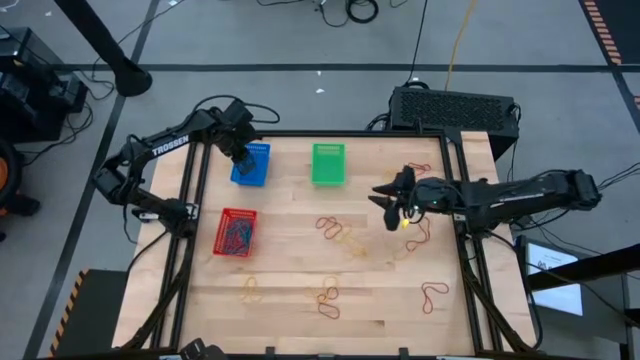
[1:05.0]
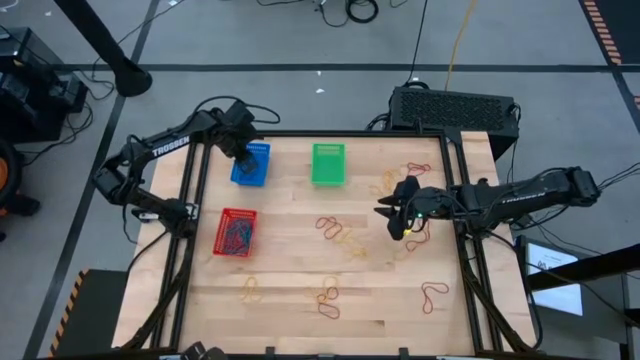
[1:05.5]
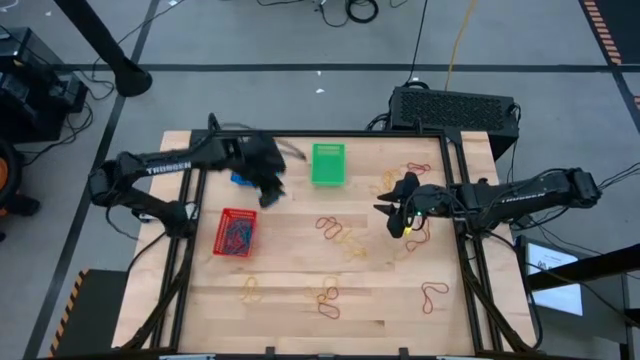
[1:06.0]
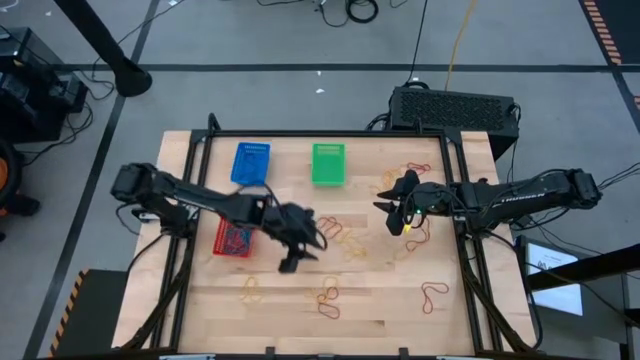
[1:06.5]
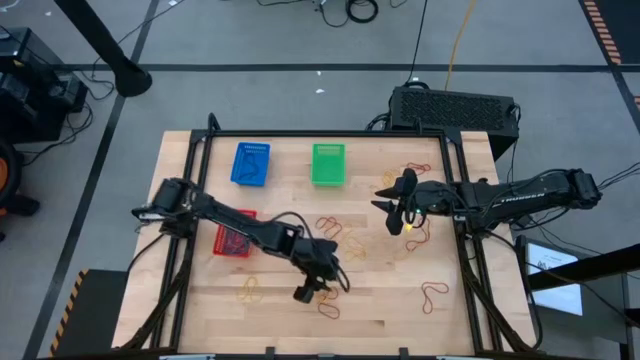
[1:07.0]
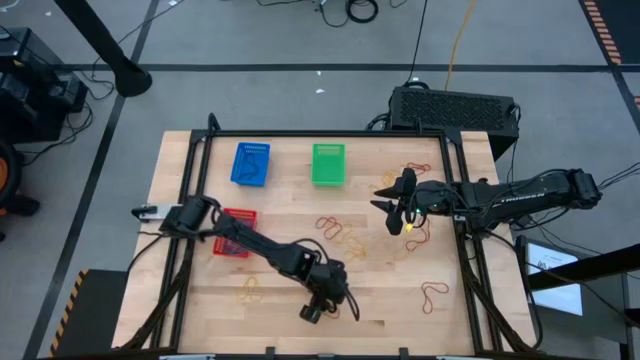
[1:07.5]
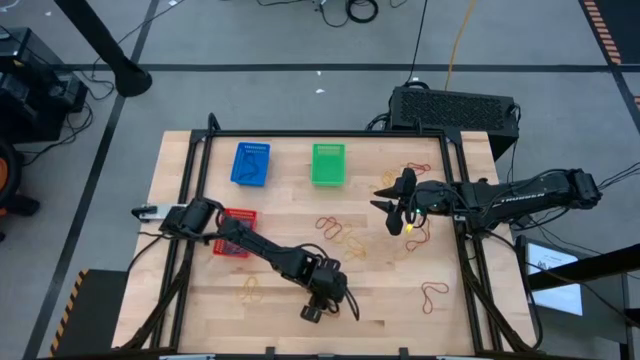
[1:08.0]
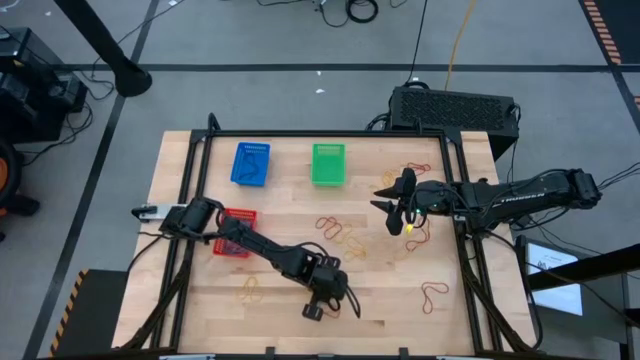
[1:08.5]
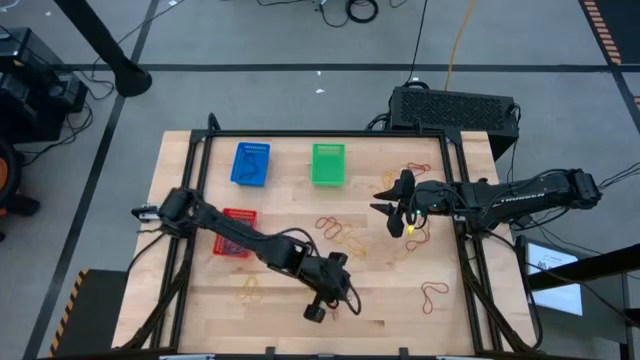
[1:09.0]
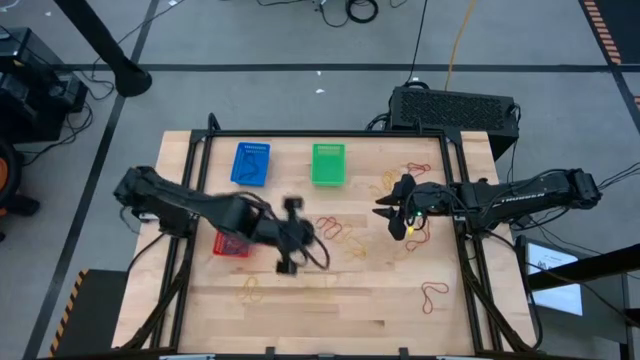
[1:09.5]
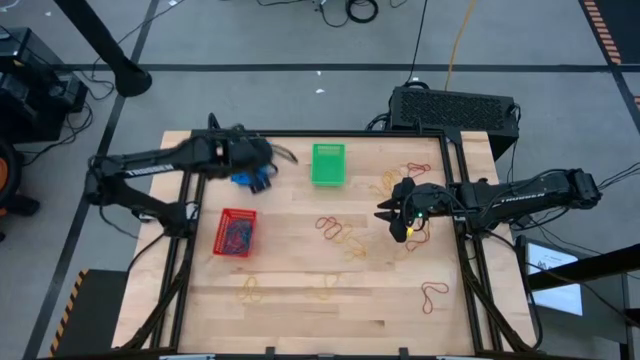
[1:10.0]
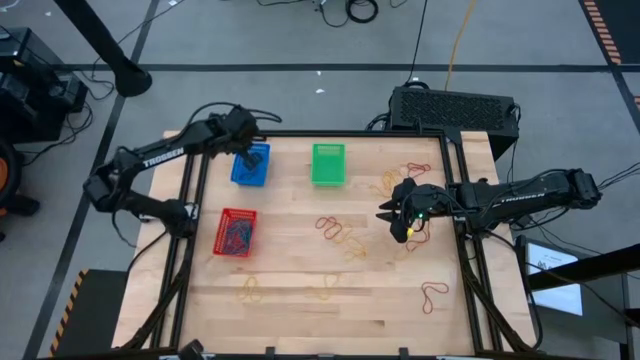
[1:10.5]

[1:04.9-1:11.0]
Task: Sort rubber bands into baskets
Put the red rubber band into the blue basket

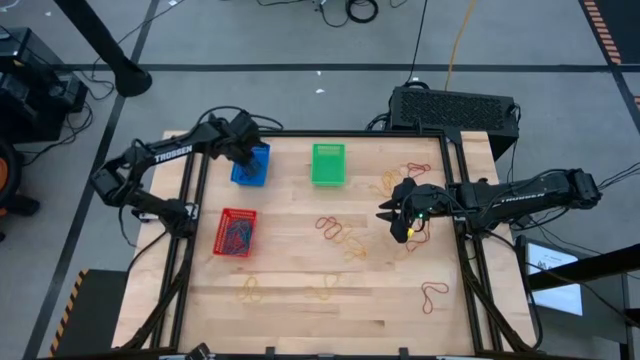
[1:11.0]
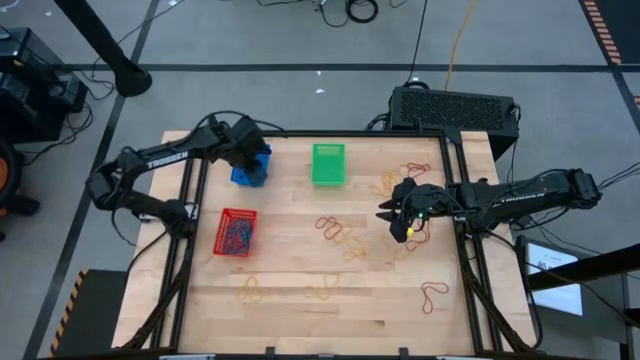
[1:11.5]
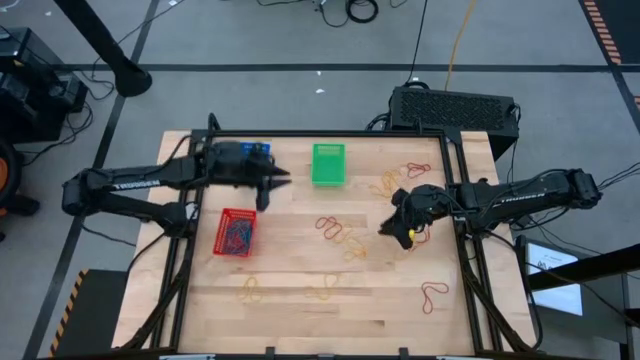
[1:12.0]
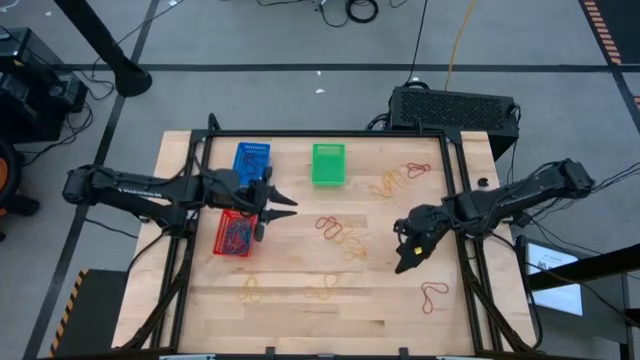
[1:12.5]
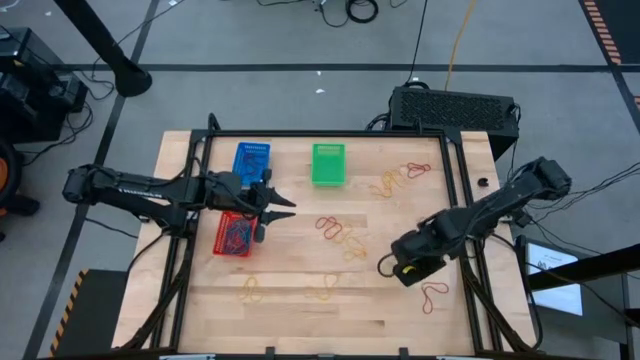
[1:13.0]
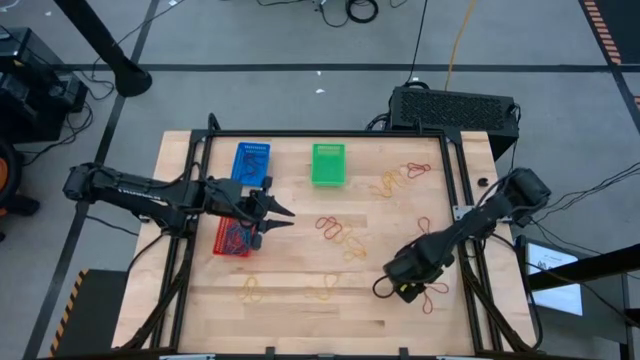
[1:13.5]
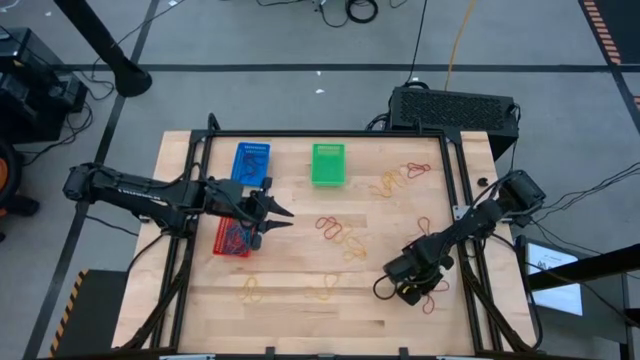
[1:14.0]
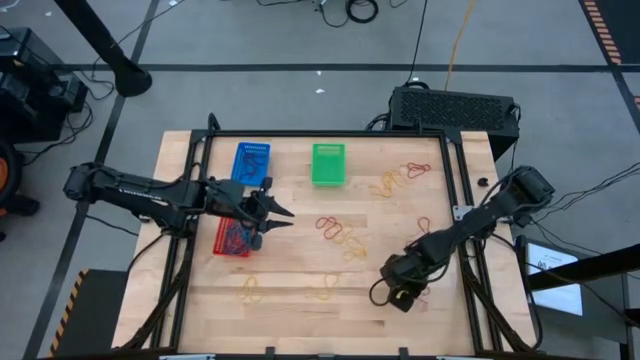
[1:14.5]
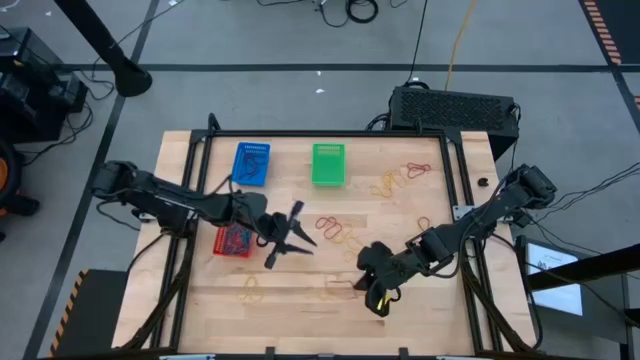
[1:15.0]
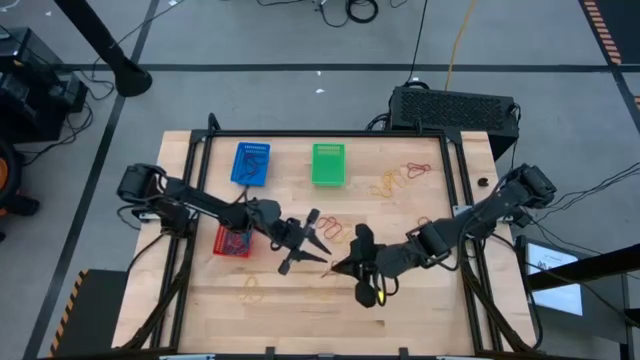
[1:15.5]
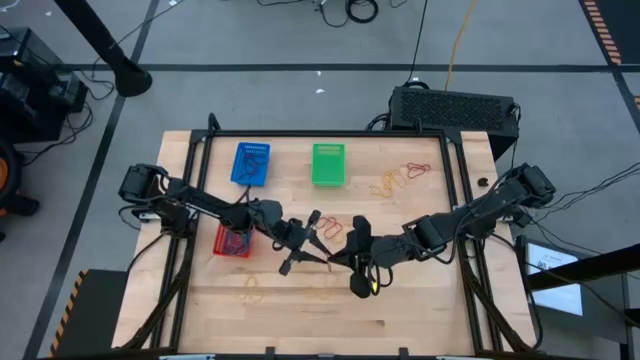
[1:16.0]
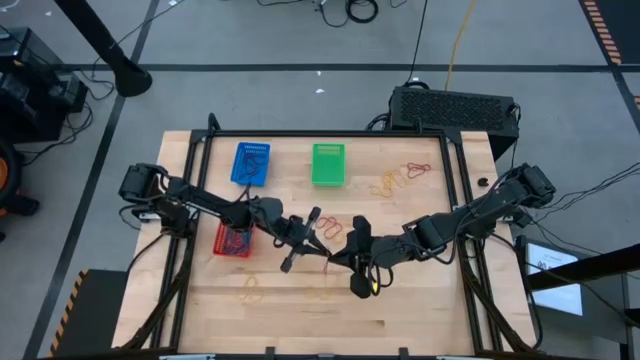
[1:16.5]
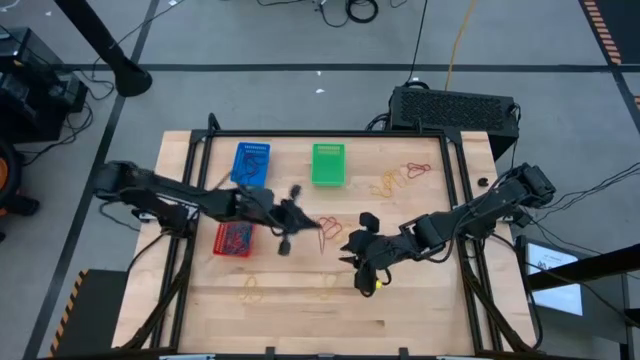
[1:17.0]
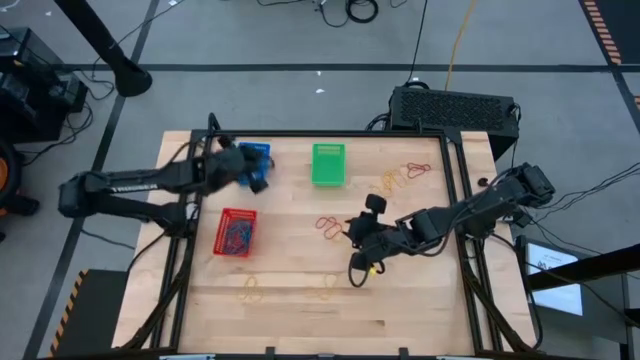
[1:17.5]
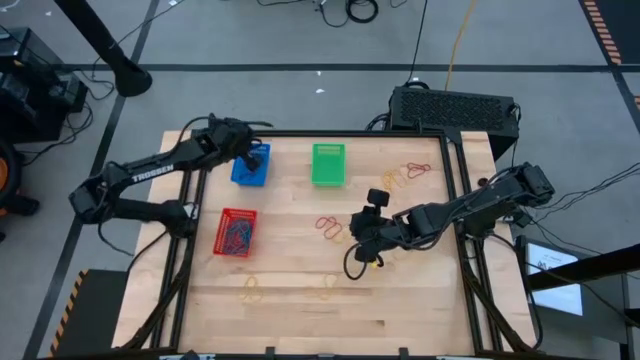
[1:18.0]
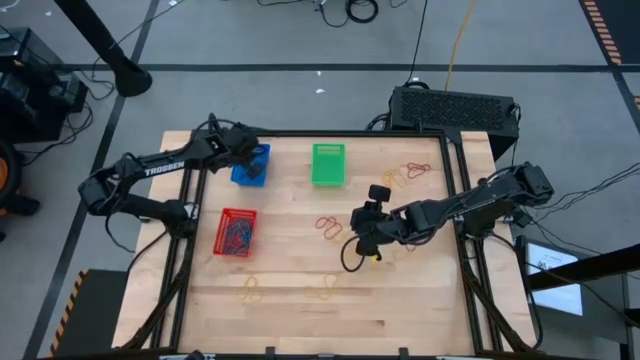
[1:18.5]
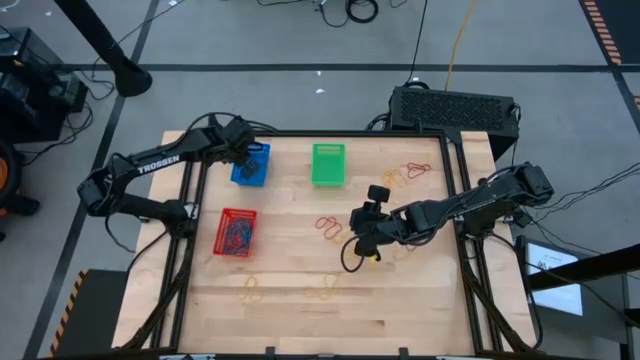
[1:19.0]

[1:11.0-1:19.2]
Put the red rubber band into the blue basket

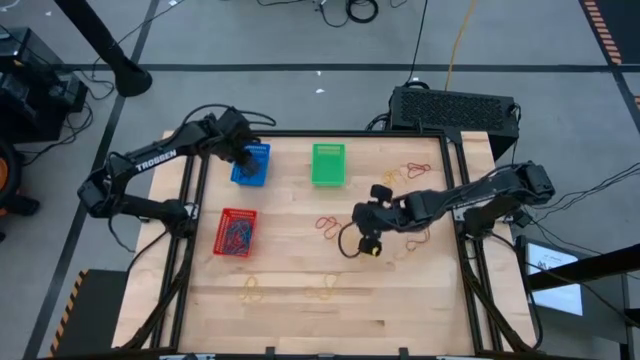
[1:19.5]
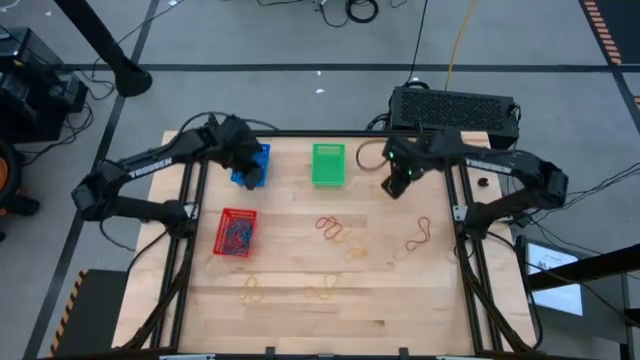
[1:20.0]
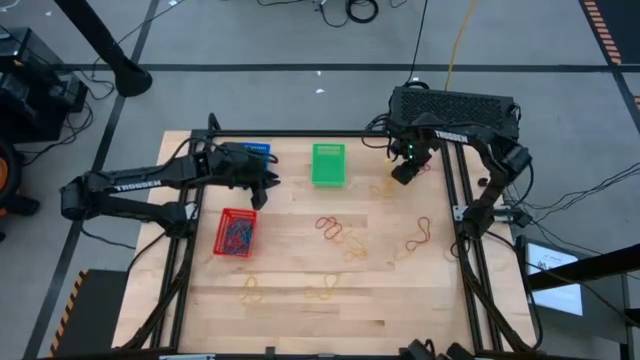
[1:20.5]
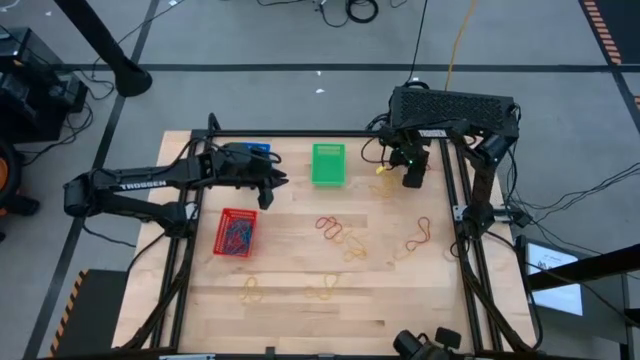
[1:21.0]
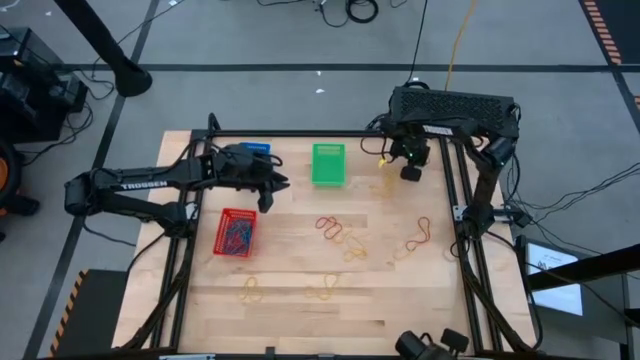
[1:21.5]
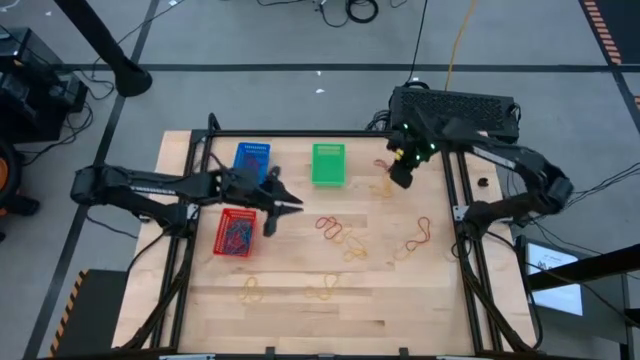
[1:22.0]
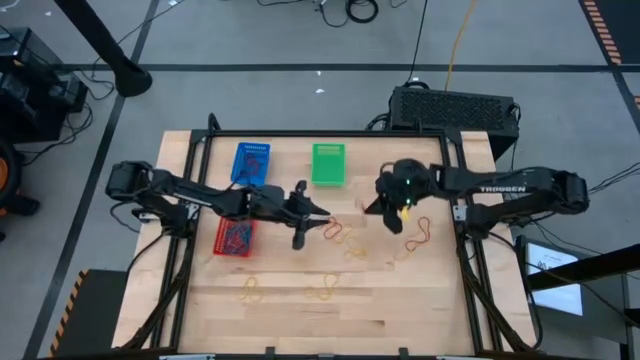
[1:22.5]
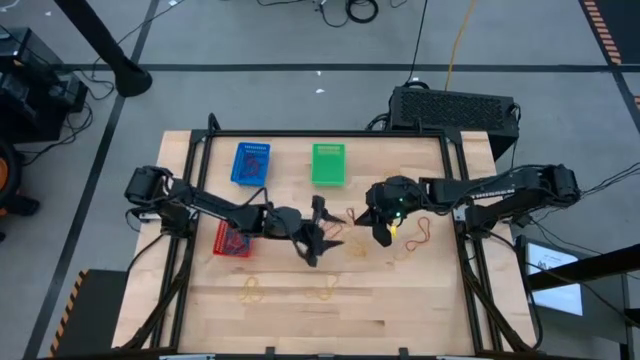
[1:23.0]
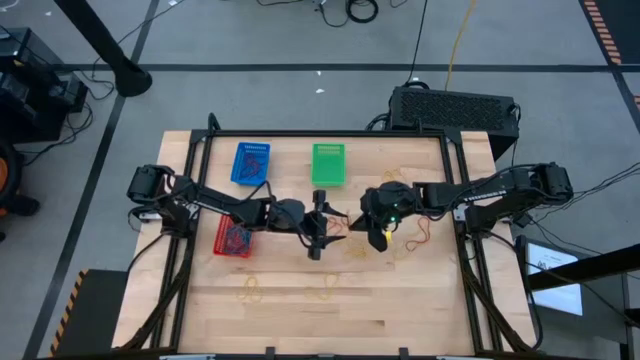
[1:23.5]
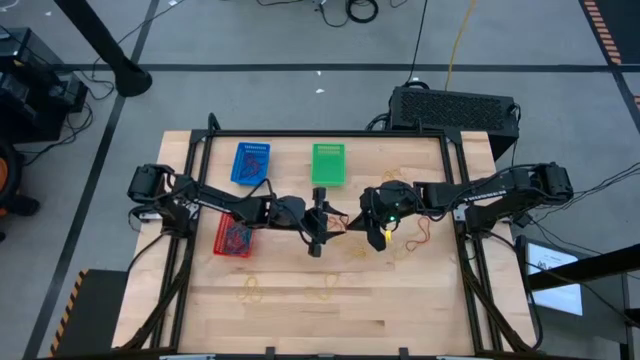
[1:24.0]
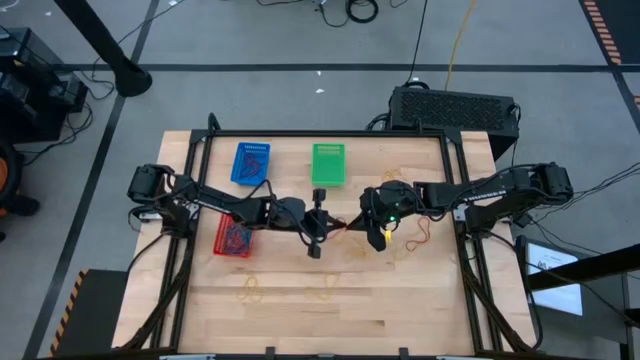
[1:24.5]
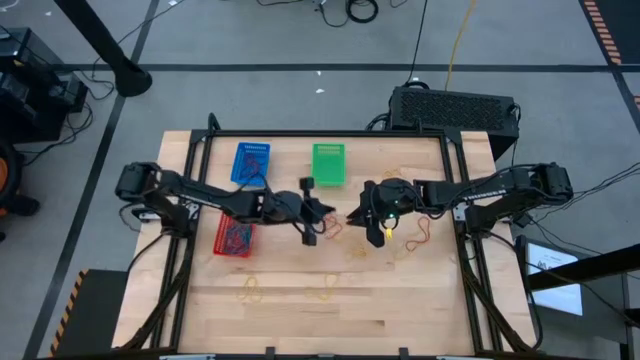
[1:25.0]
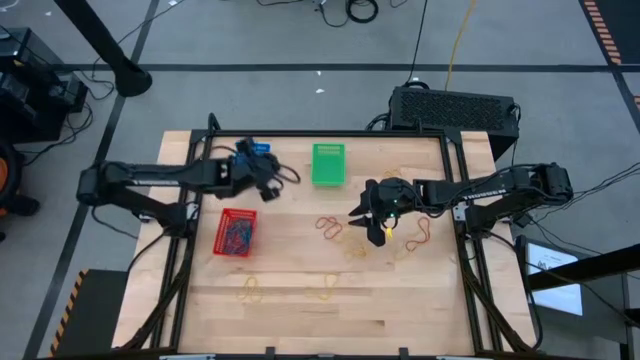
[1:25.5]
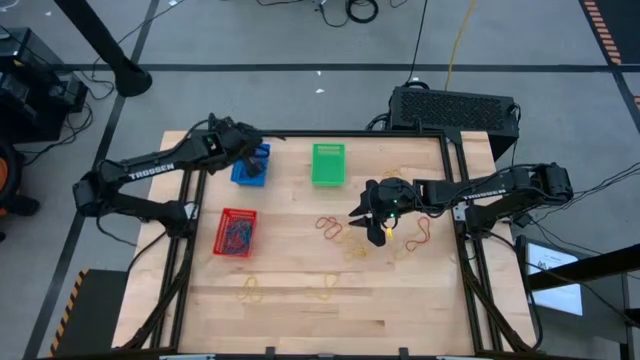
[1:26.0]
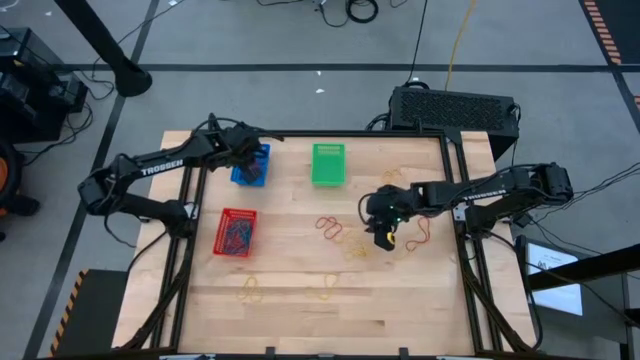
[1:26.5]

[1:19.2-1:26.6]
Put the red rubber band into the blue basket
